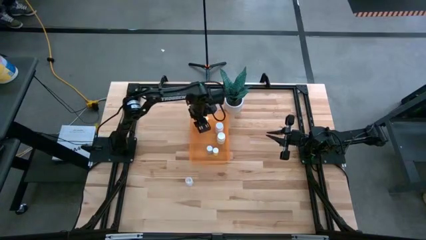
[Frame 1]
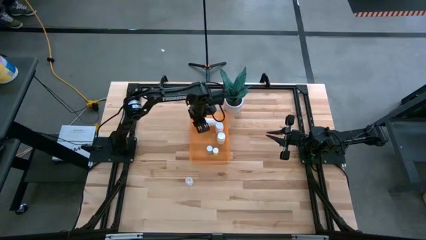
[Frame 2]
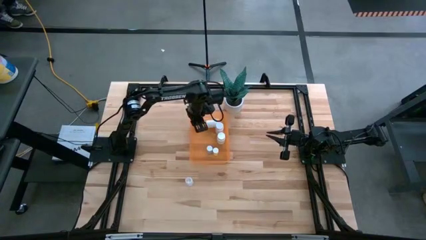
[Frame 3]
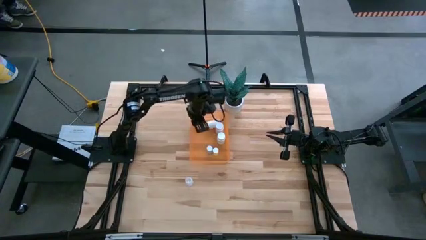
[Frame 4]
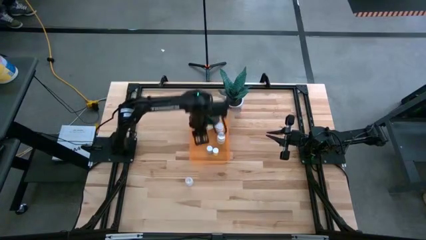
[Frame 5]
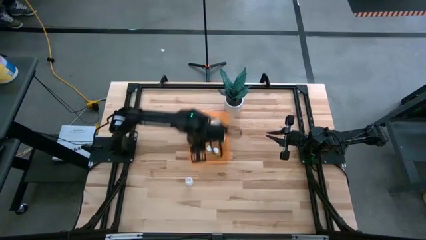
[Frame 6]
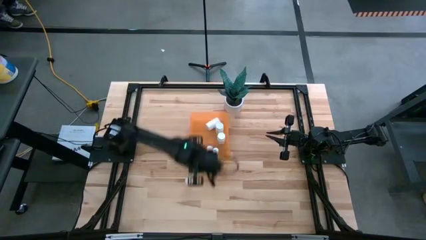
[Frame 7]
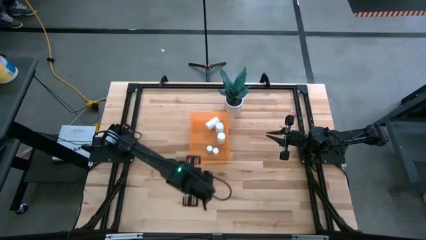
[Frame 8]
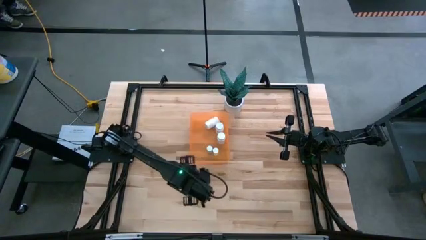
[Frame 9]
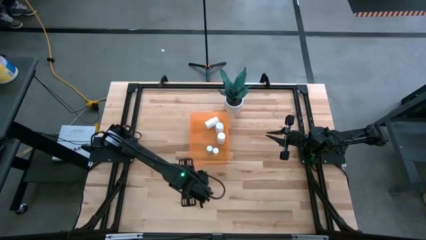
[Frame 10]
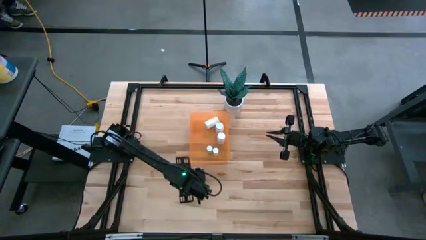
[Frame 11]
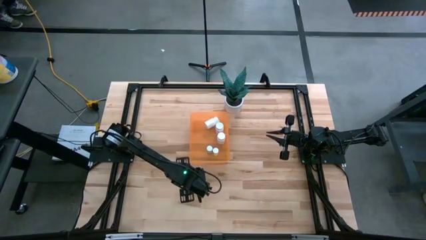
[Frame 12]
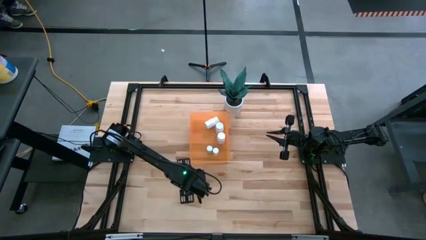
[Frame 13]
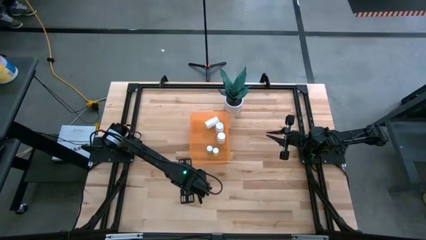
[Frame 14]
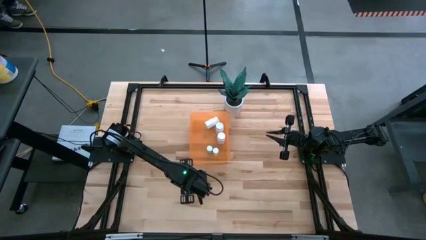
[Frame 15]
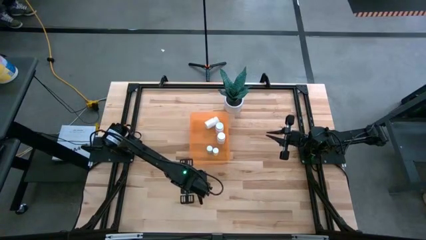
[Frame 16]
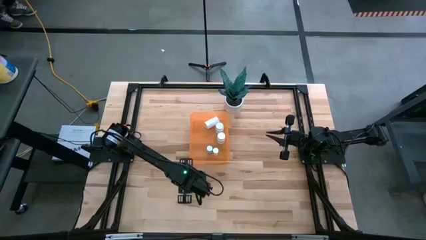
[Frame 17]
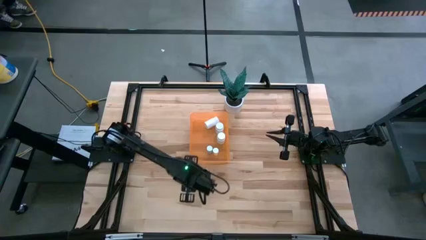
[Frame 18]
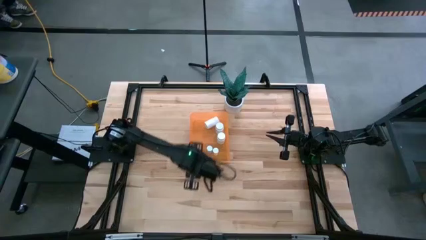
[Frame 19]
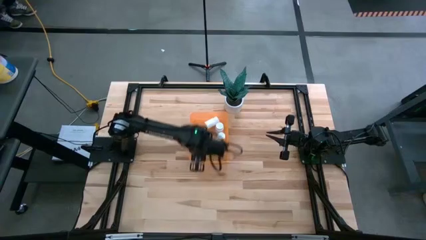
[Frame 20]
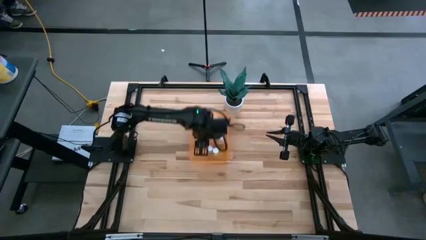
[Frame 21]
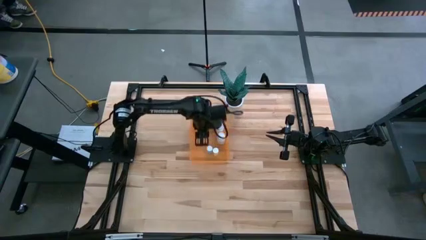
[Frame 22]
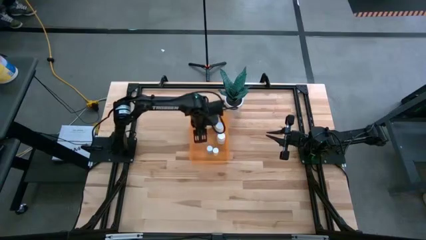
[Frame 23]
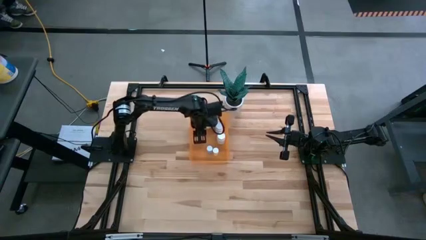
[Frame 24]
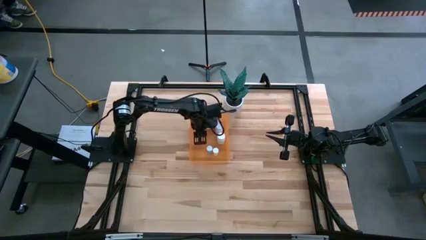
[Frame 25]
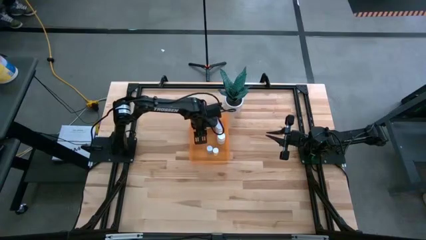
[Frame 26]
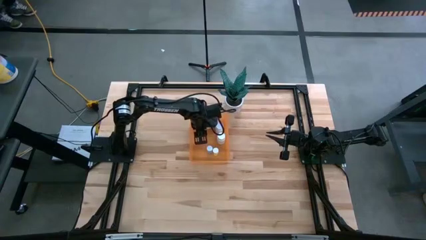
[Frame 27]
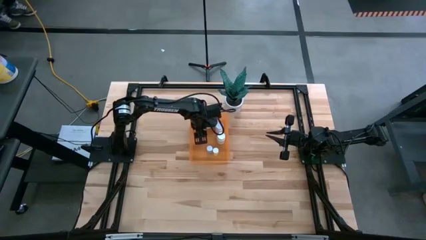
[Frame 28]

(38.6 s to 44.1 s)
Task: Pick and place pill bottles into a basket
Put the transparent pill bottle into the orange bin

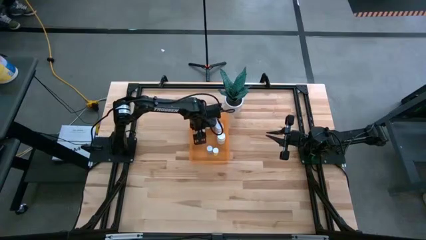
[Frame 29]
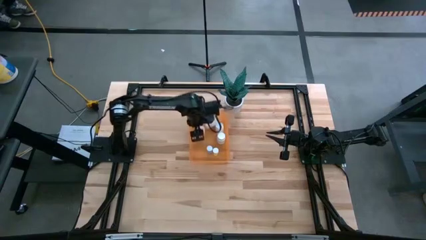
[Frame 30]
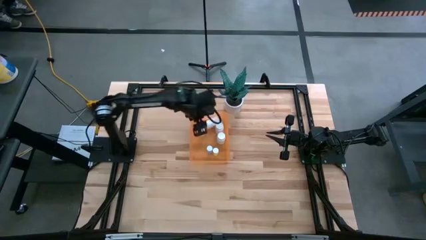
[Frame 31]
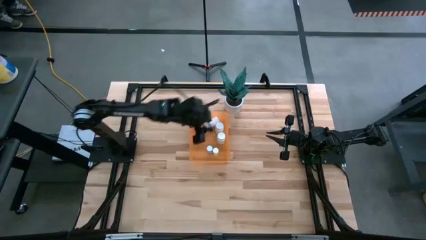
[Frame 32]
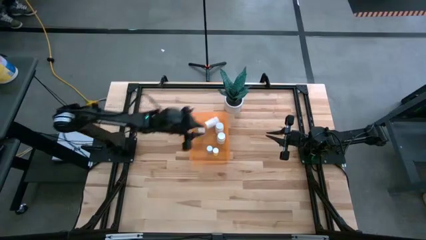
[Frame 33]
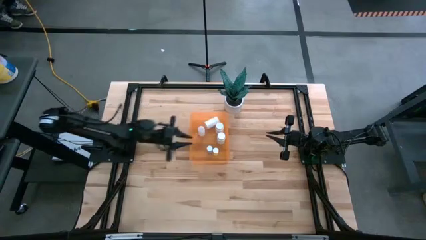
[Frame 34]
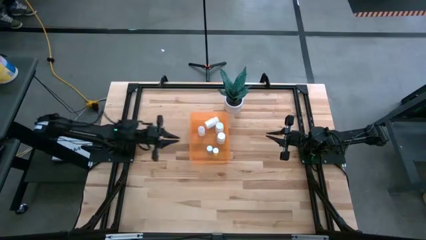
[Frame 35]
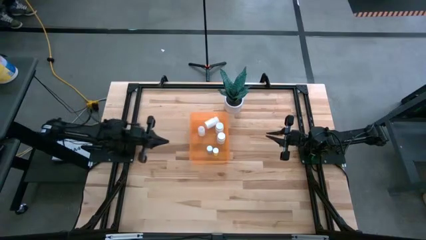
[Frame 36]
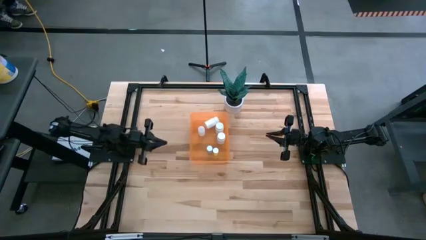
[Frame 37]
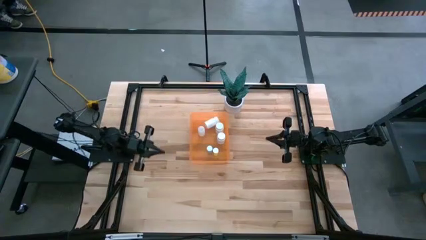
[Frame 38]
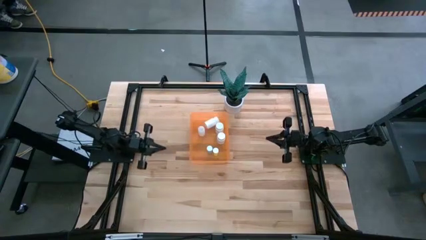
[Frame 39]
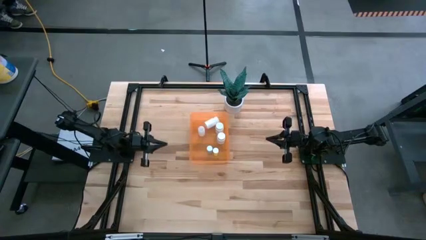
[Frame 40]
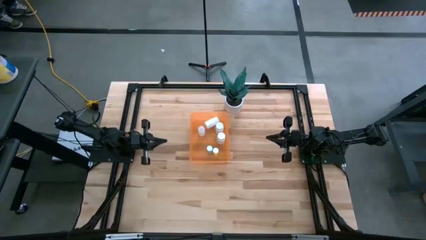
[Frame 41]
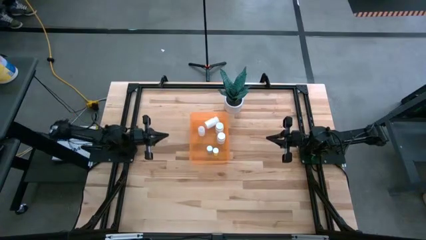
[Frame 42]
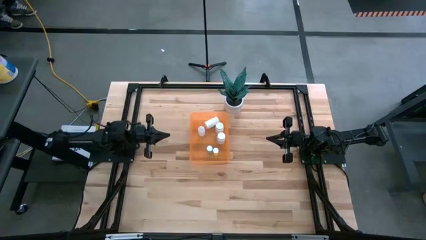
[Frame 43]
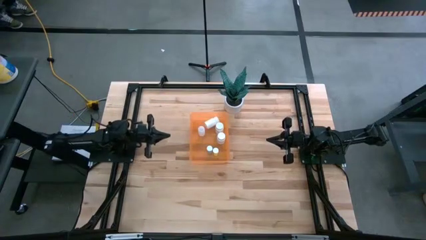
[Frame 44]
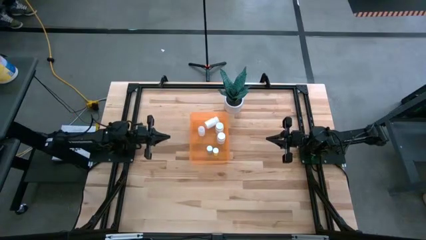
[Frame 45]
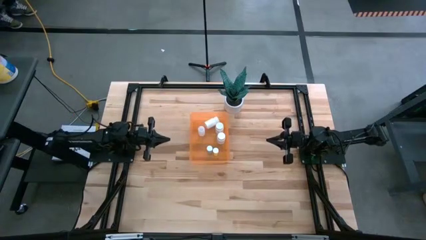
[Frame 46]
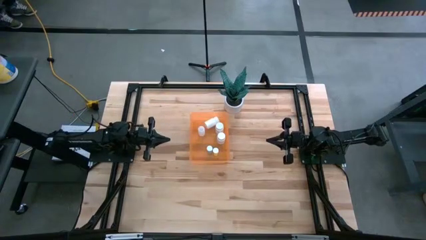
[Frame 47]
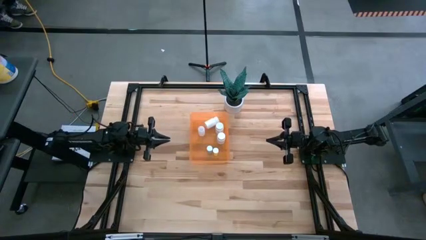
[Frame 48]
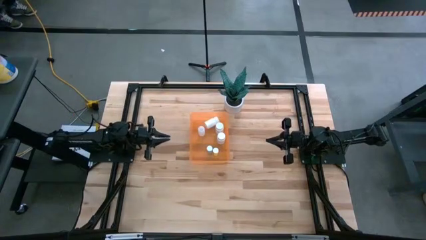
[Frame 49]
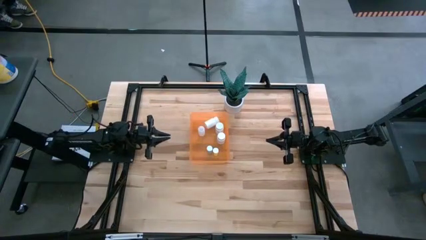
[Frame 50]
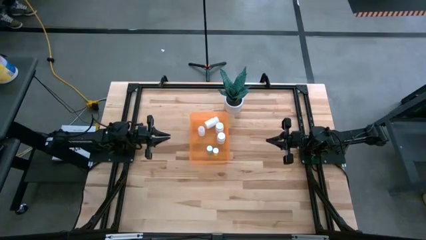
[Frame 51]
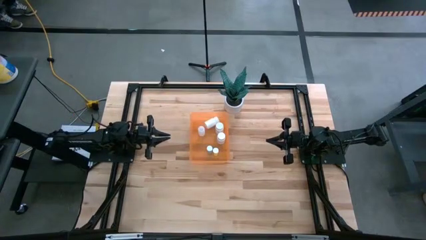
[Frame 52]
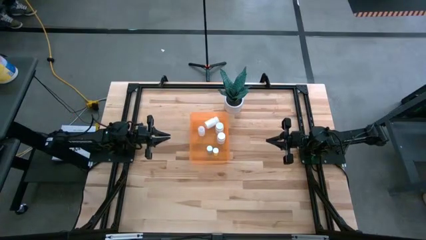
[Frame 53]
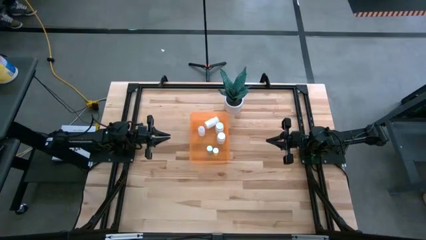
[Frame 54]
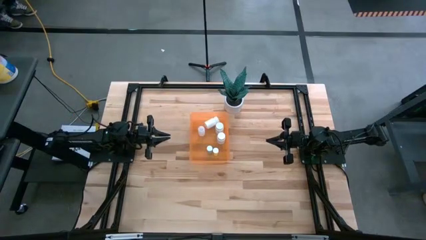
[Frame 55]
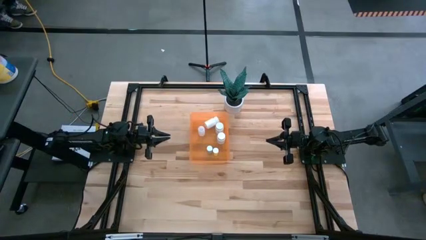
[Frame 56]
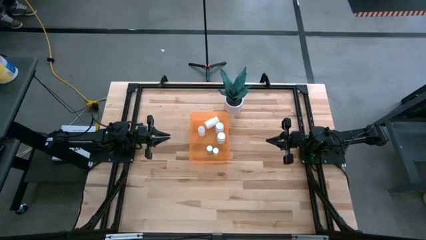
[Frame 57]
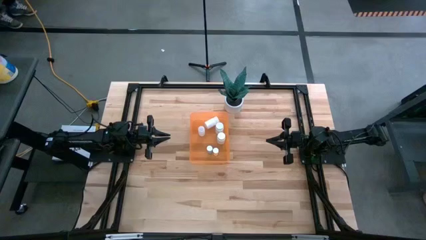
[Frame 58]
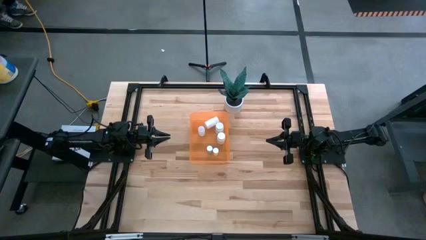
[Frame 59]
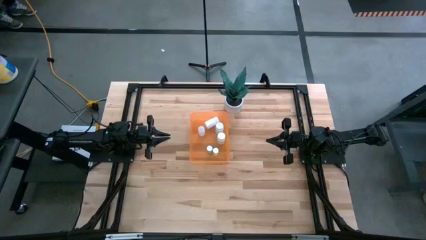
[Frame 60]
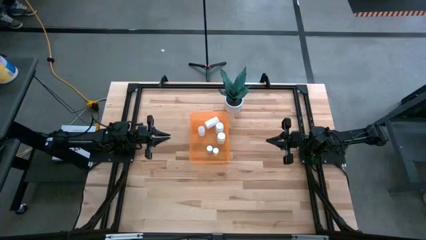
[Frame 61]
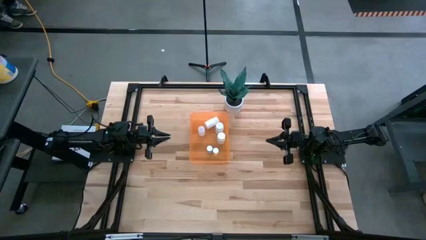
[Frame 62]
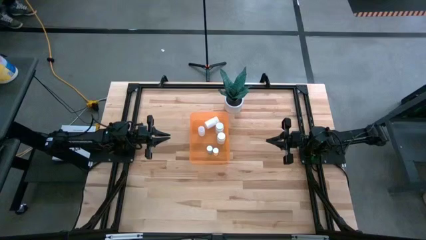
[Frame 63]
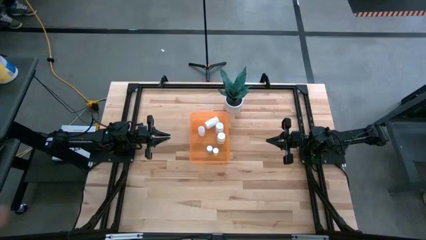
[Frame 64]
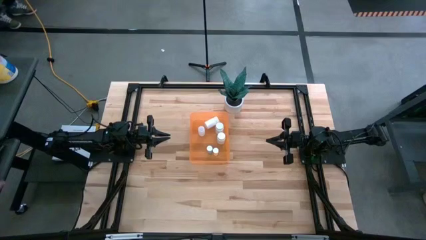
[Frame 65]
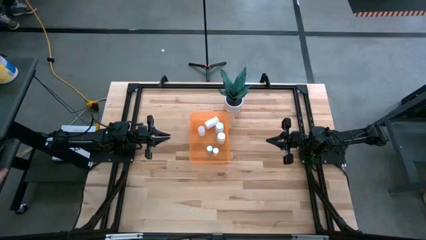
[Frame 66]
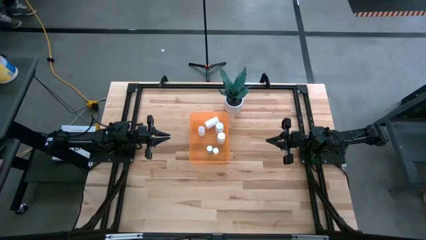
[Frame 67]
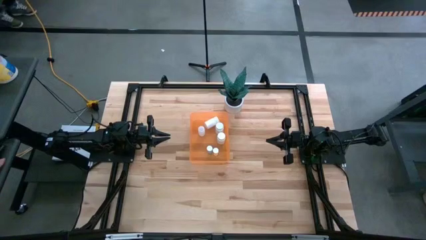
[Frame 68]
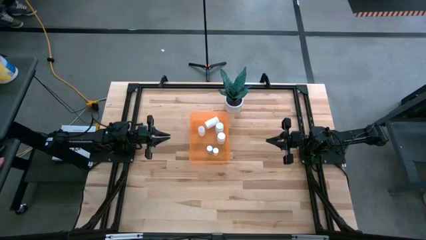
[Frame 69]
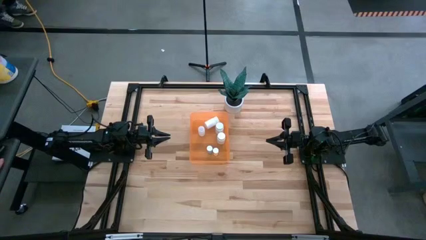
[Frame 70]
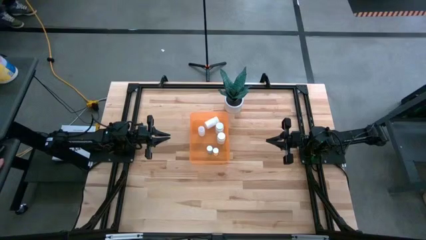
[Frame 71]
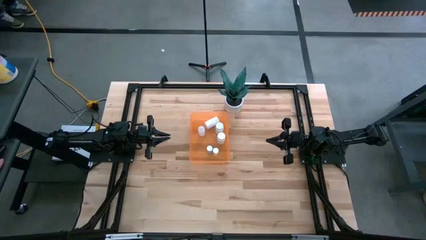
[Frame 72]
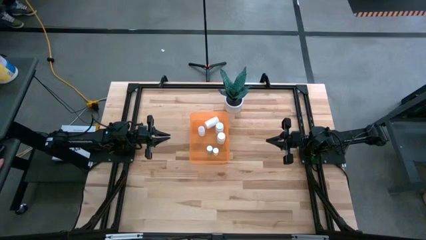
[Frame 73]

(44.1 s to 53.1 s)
Return to Home Position

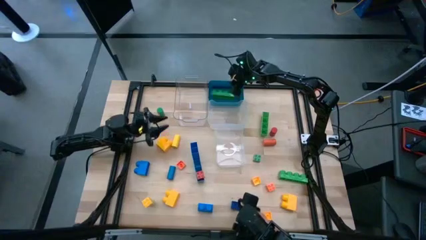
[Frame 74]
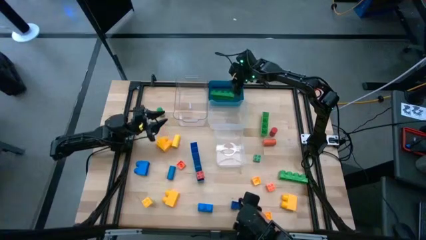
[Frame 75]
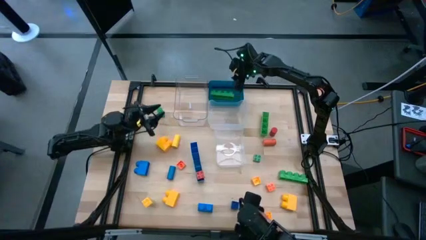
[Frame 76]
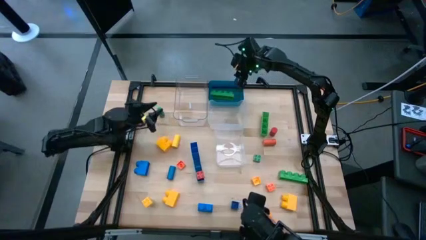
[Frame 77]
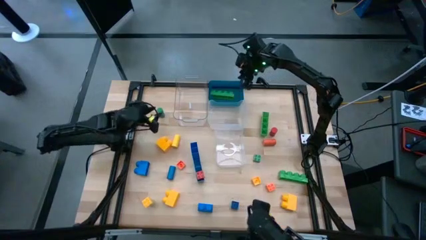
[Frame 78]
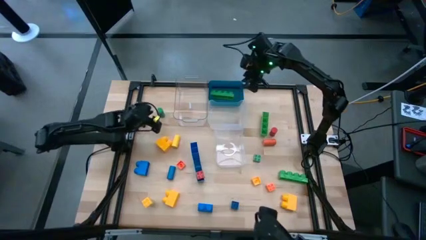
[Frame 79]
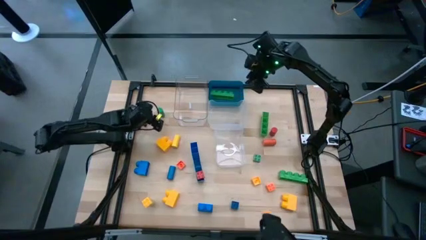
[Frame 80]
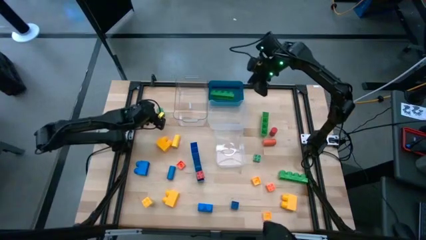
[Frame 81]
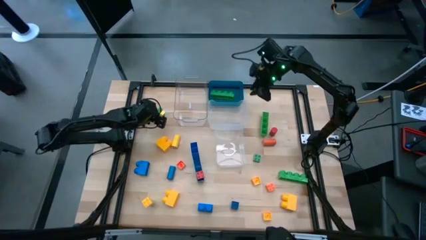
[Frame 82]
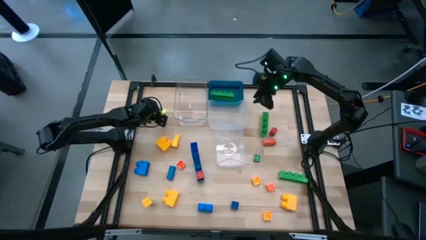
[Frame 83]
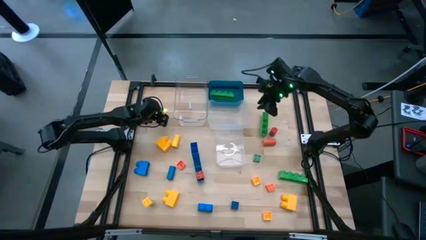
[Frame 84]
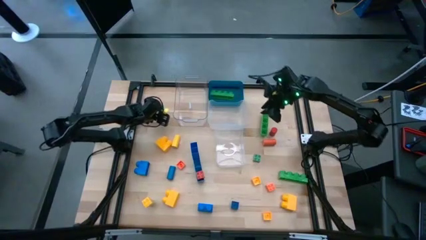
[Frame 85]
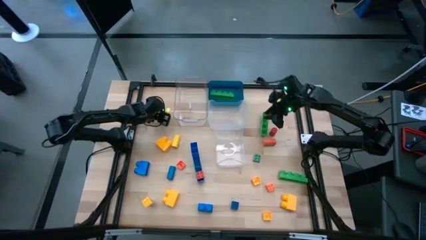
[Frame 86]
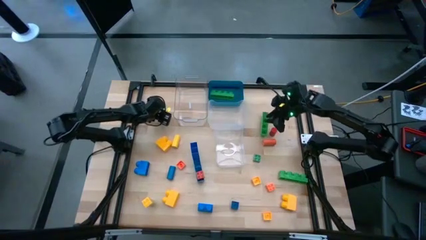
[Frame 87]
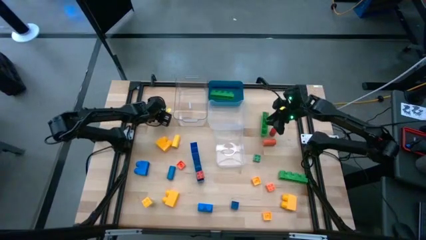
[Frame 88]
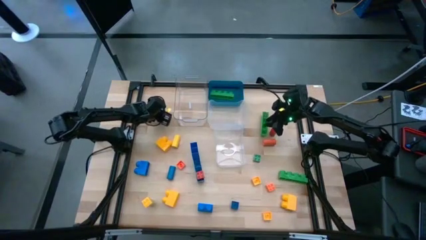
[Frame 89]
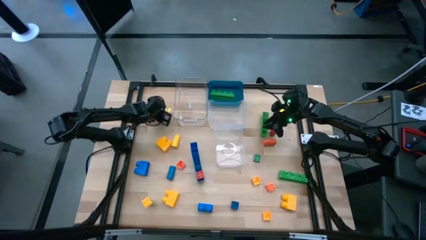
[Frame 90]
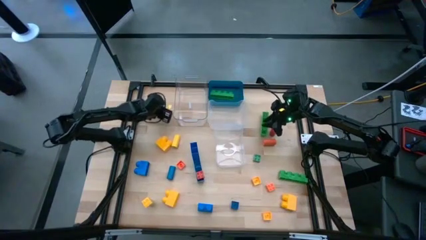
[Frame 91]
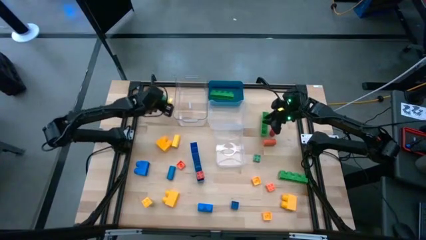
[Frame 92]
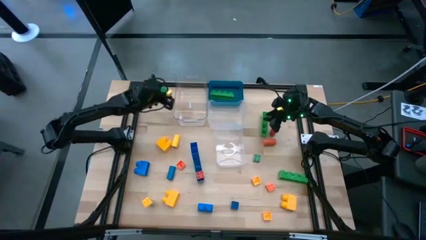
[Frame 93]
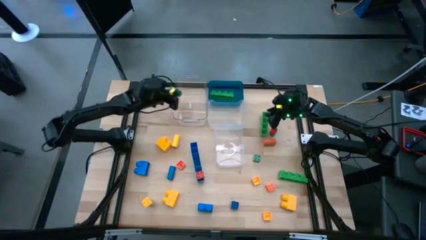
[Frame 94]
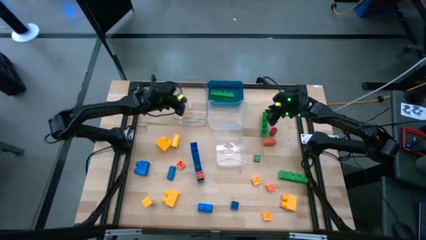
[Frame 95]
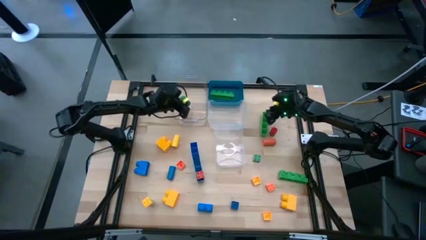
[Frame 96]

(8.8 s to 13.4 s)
Task: Sort blocks by size
Put the green cylindrical block into the top left transparent bin
